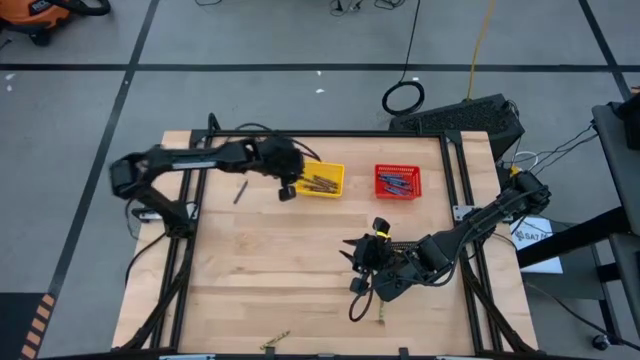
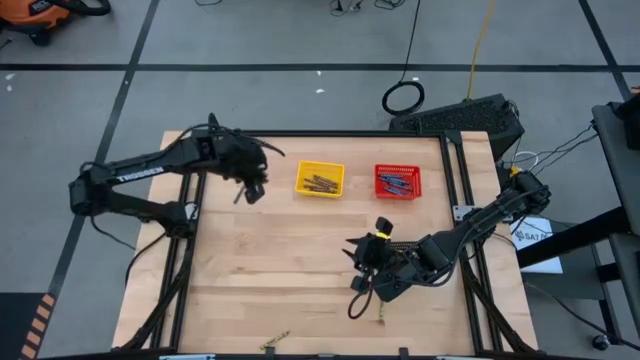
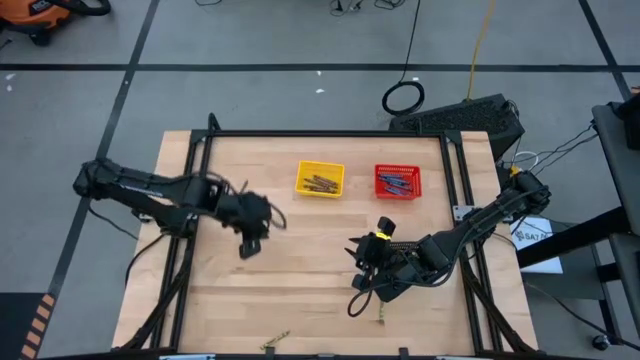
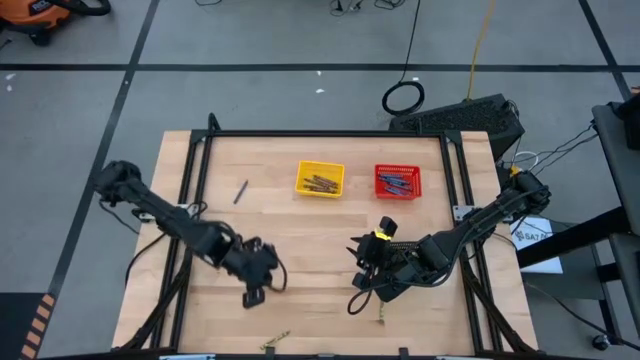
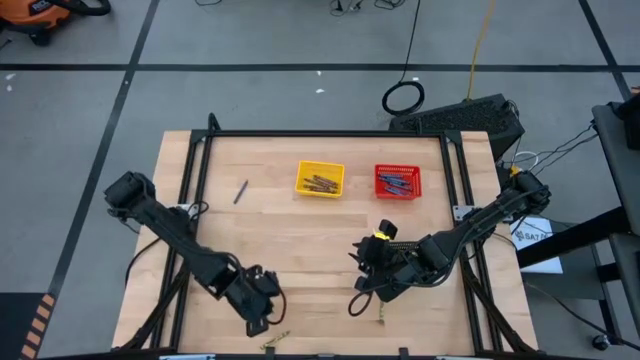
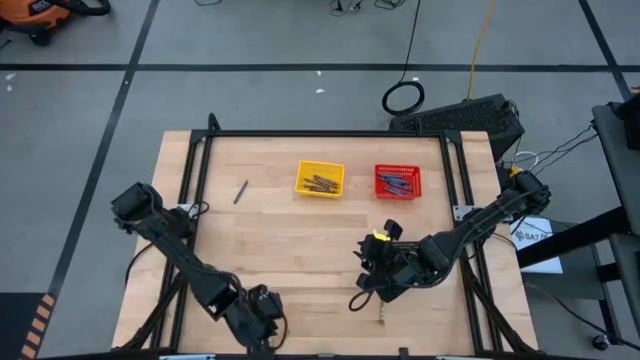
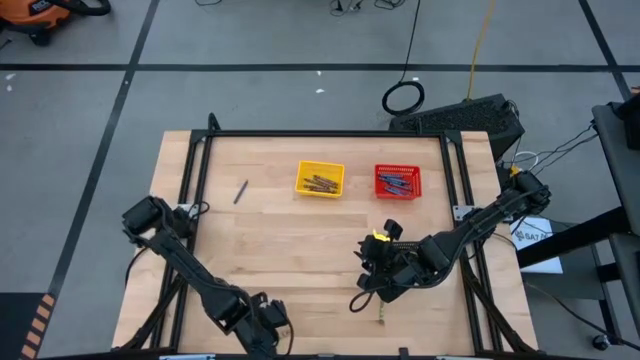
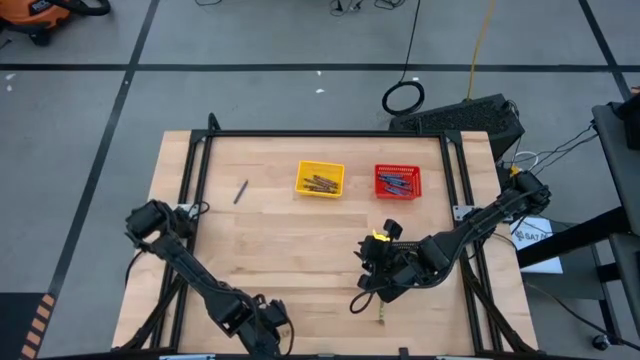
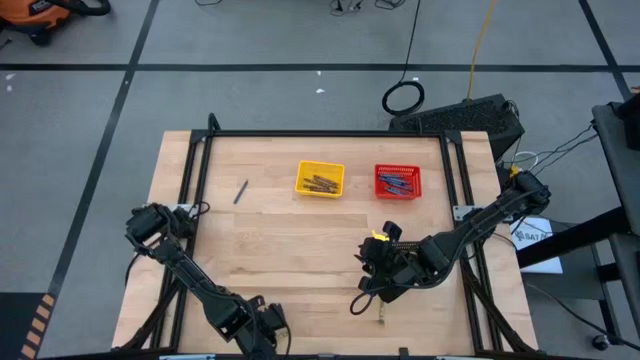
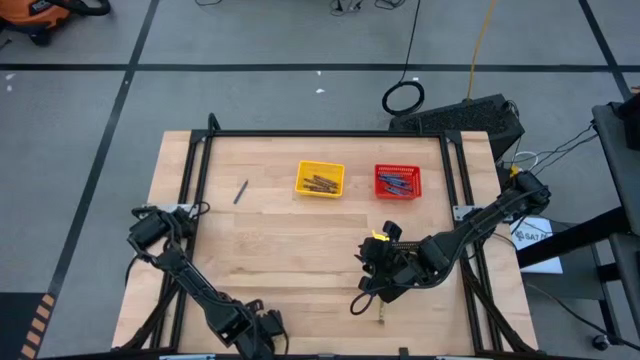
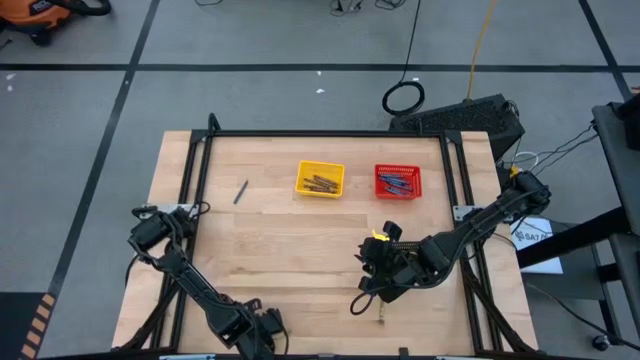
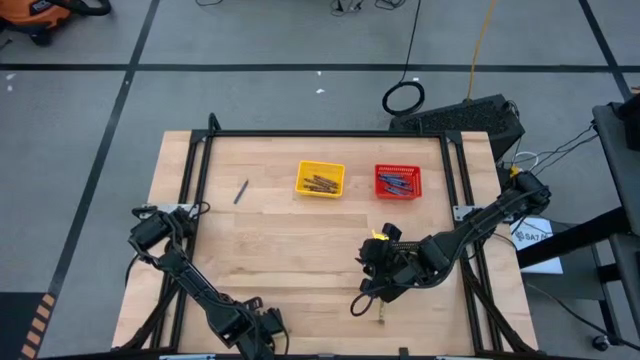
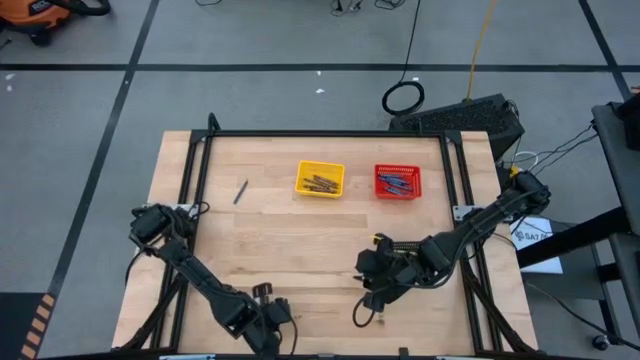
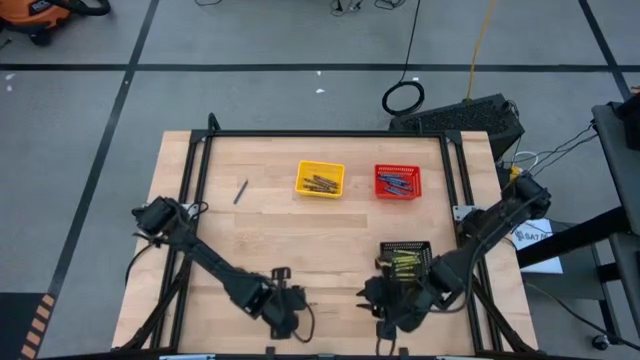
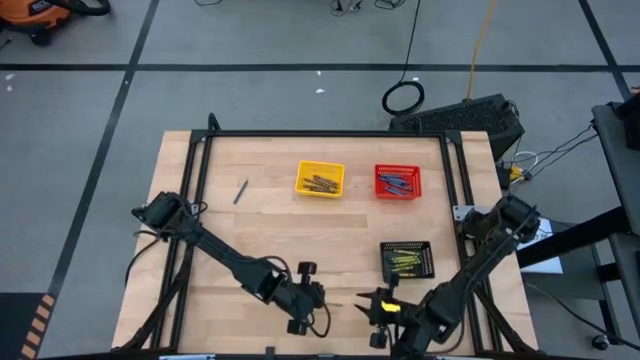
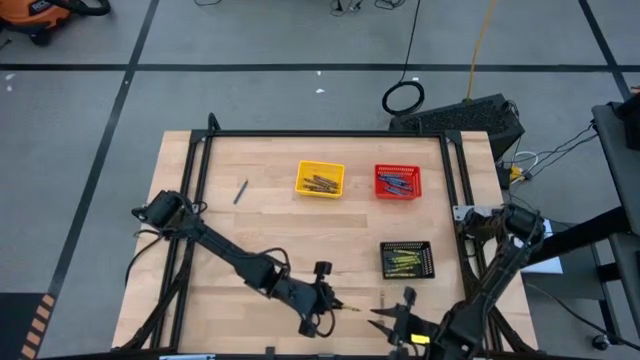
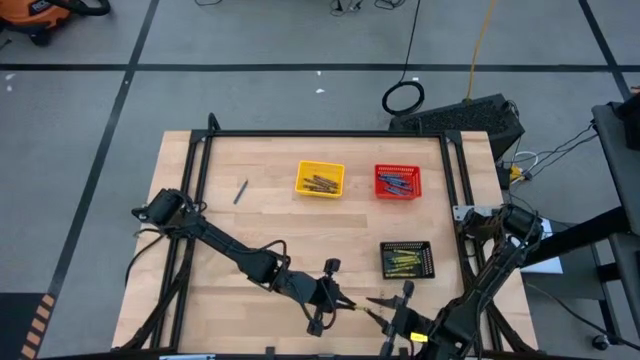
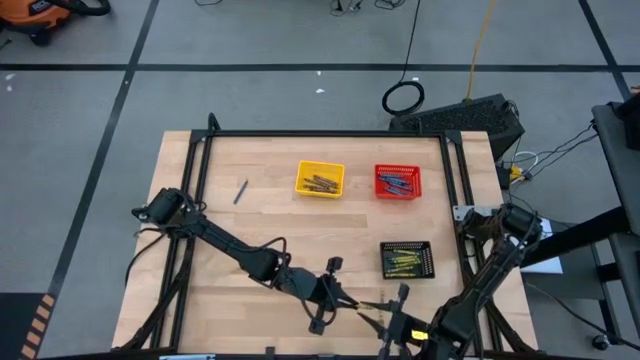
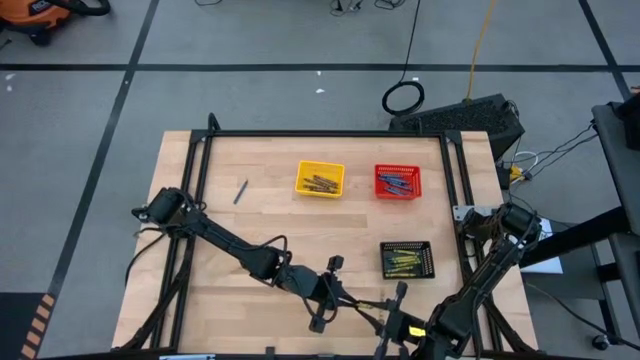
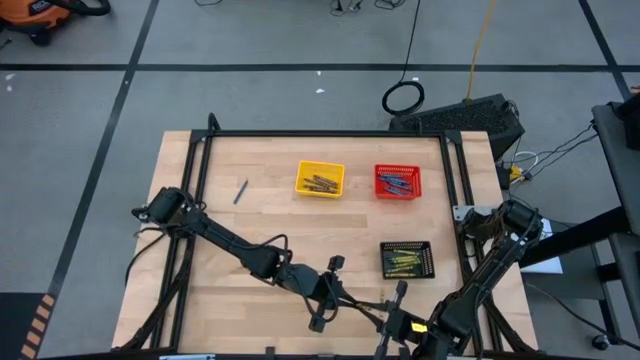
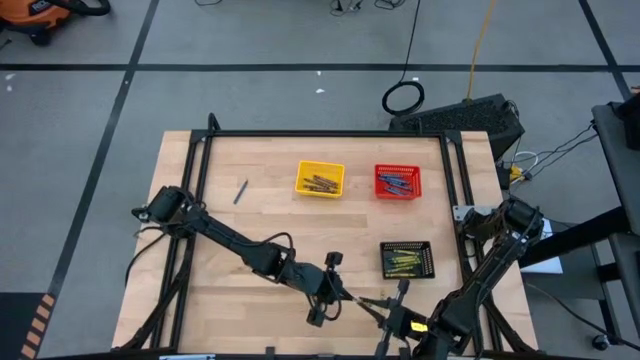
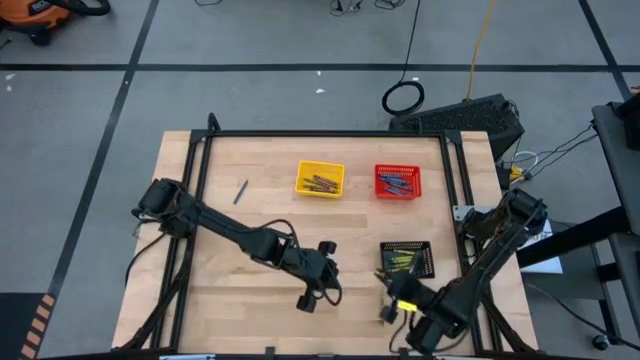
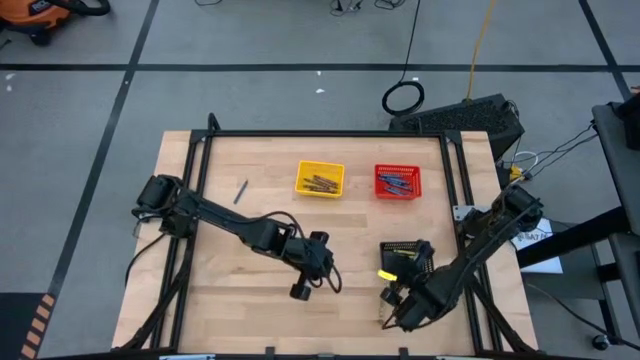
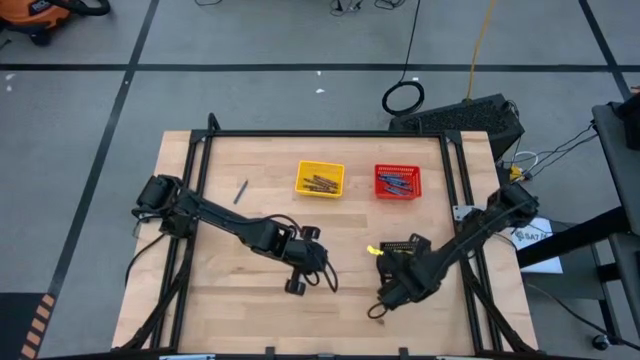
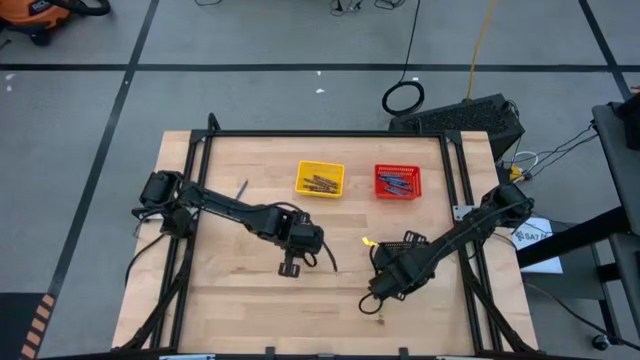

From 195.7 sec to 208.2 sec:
Task: Sort crayons
Put the green crayon into the black bin

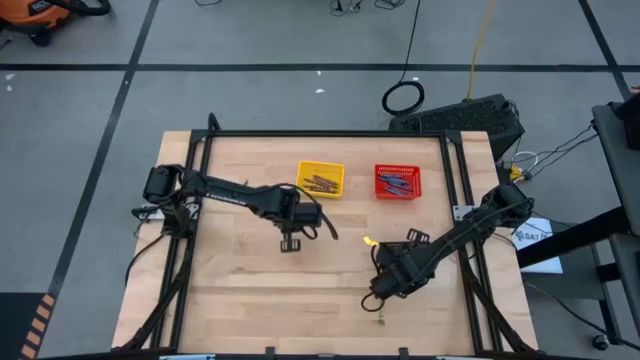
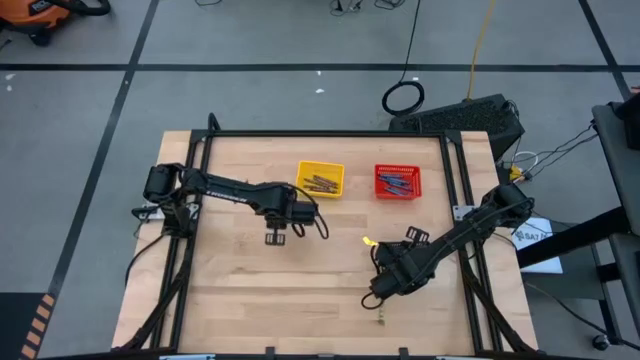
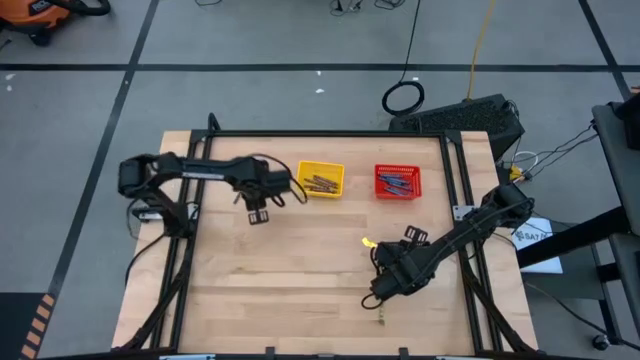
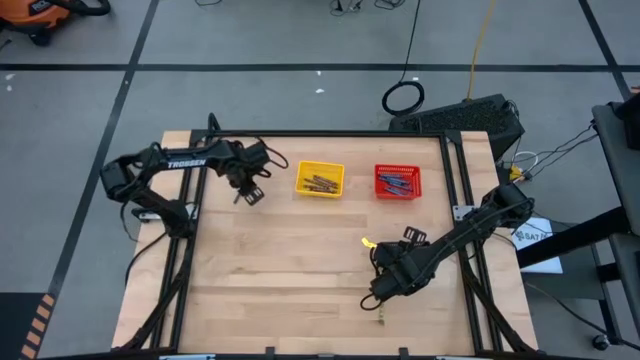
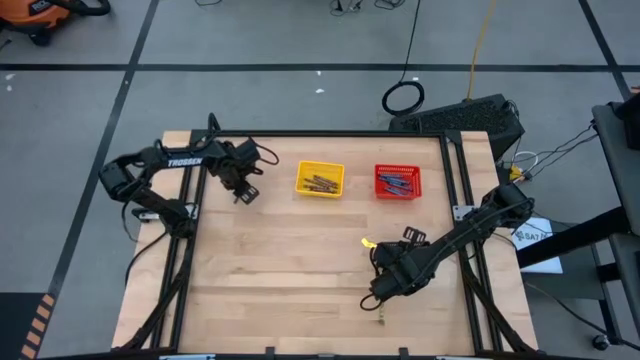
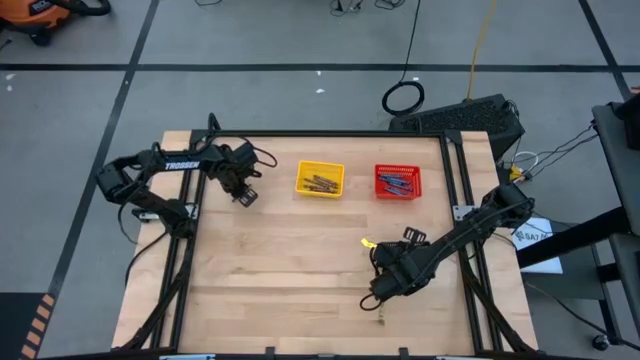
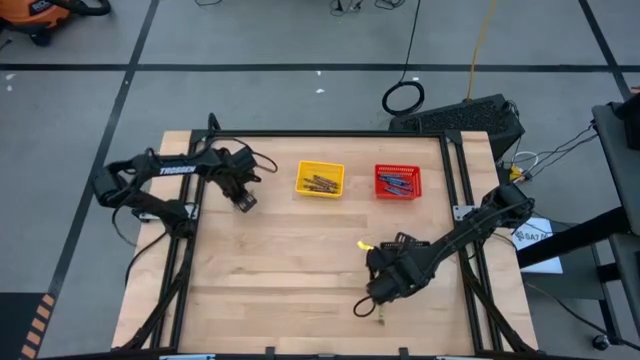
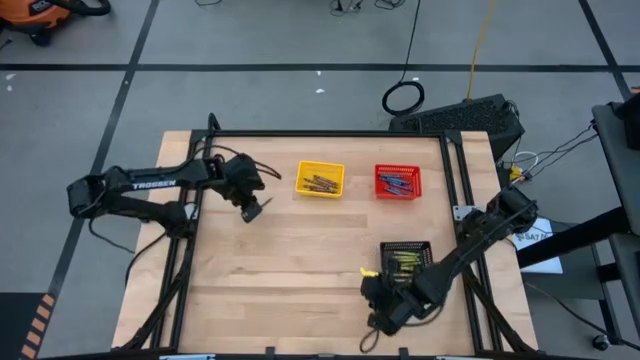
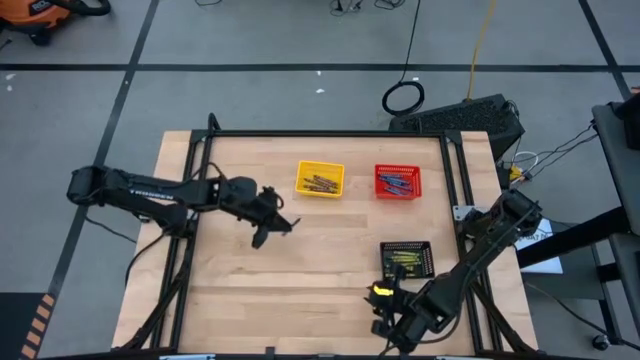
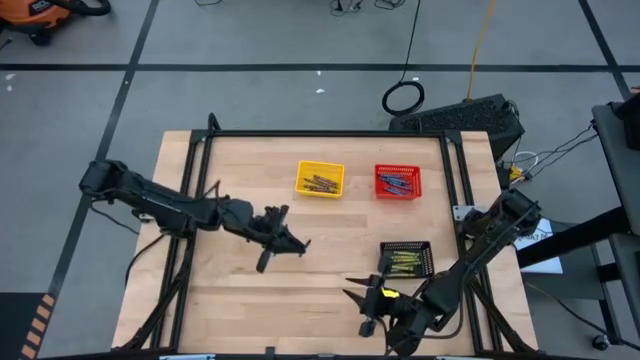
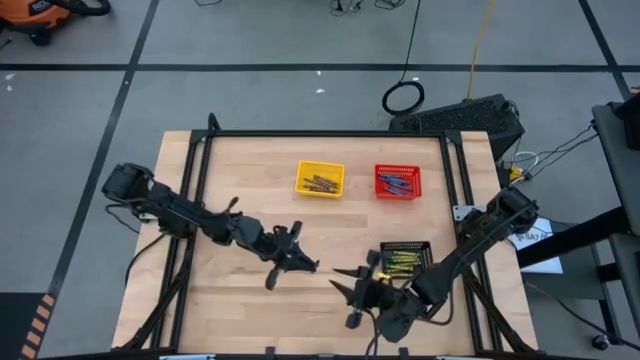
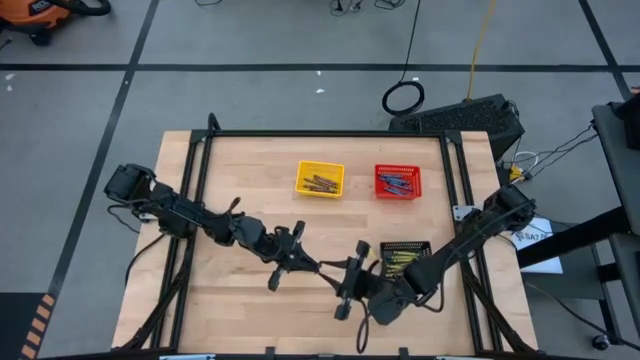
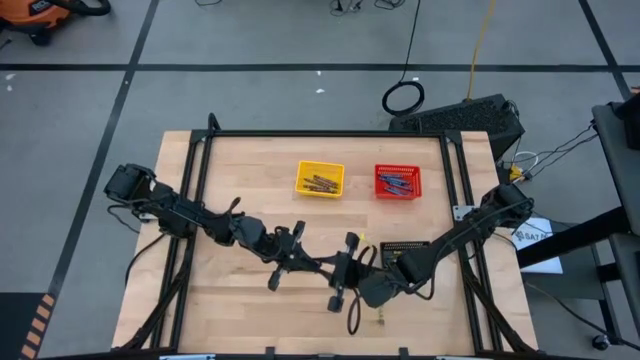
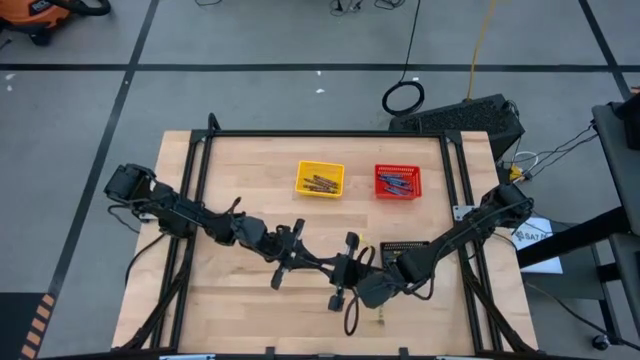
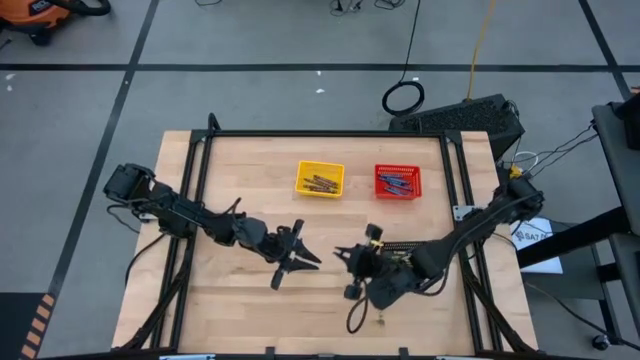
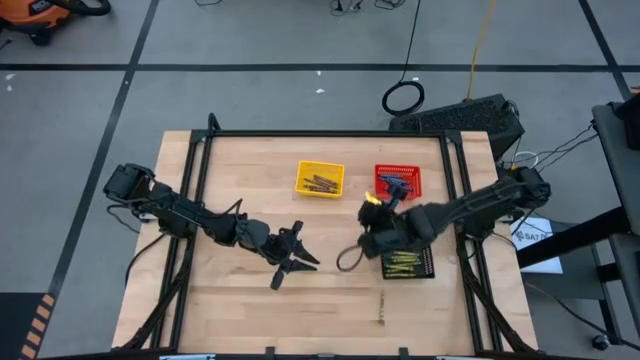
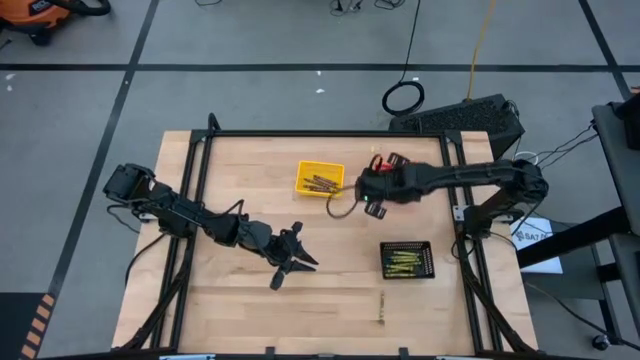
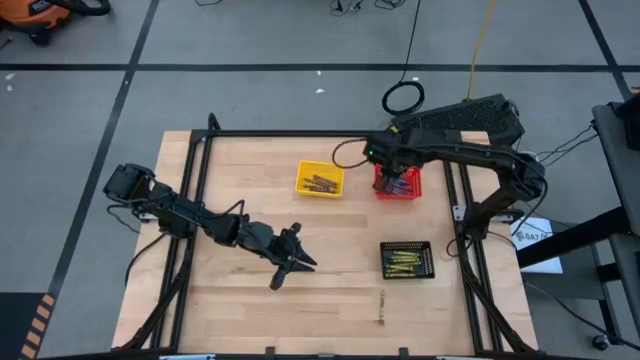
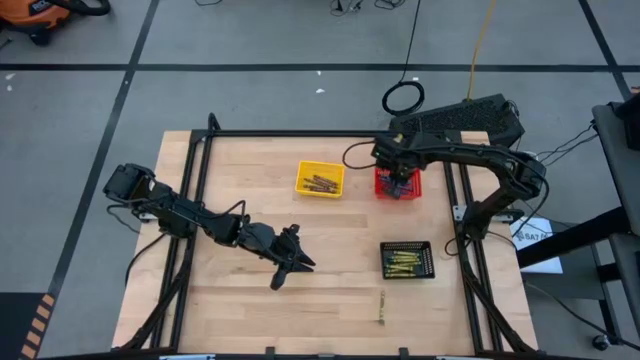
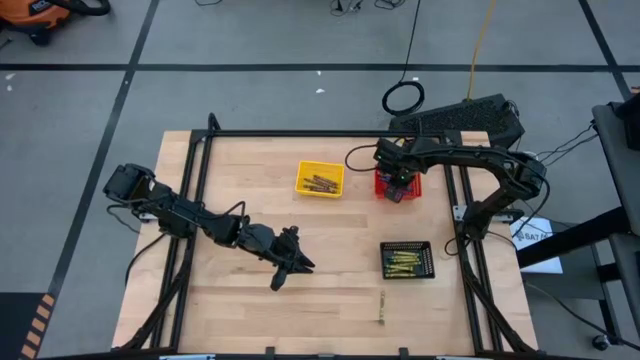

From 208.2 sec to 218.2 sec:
Put the blue crayon into the red bin
